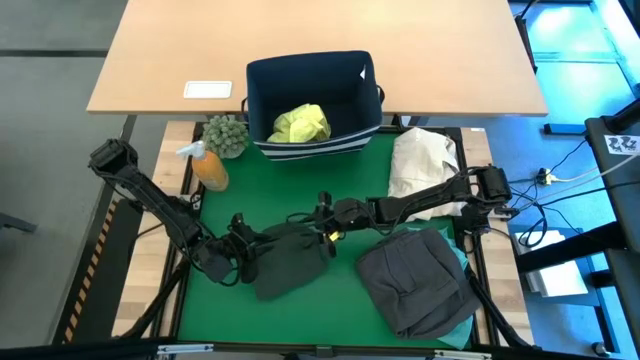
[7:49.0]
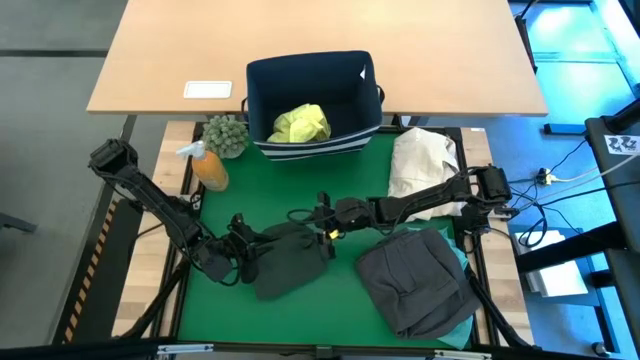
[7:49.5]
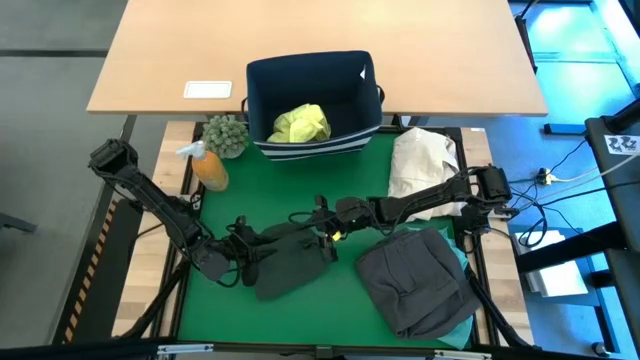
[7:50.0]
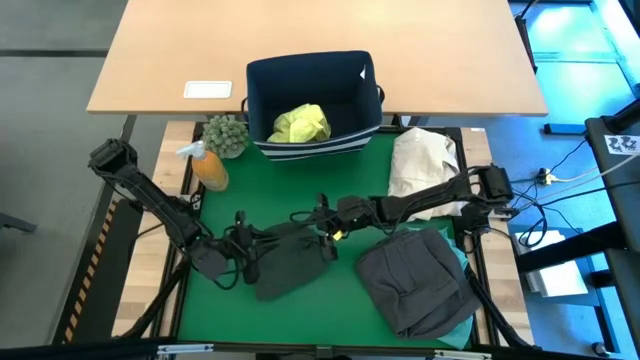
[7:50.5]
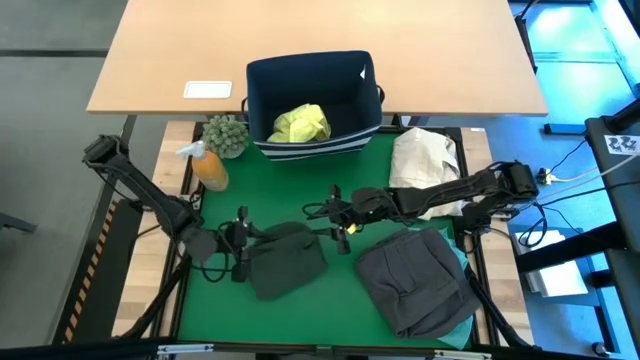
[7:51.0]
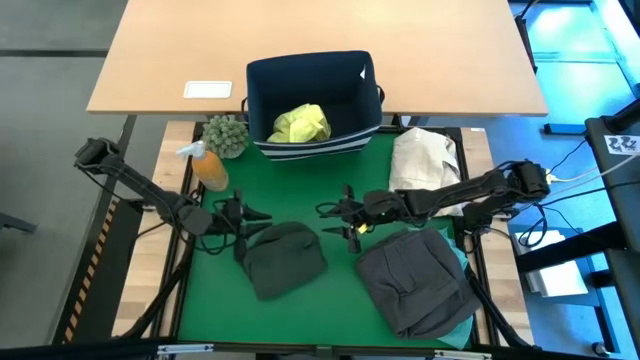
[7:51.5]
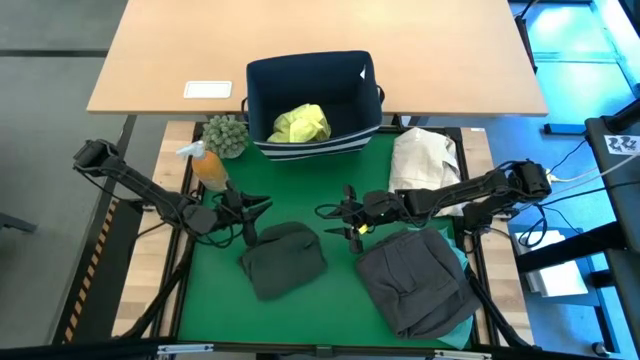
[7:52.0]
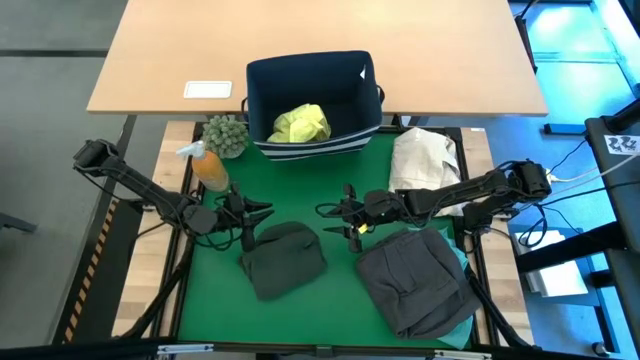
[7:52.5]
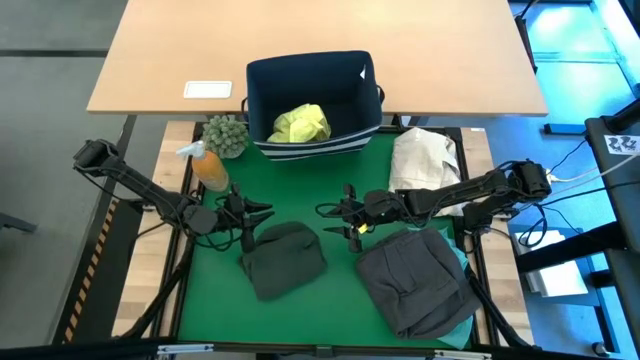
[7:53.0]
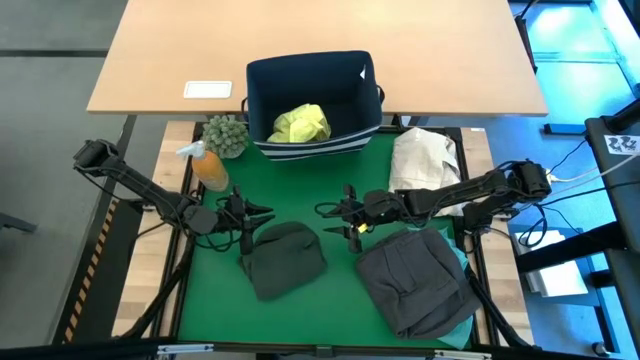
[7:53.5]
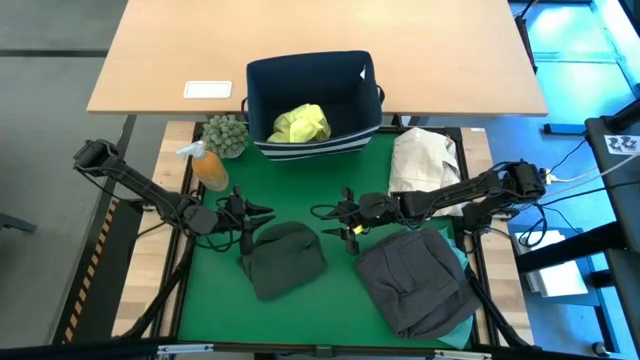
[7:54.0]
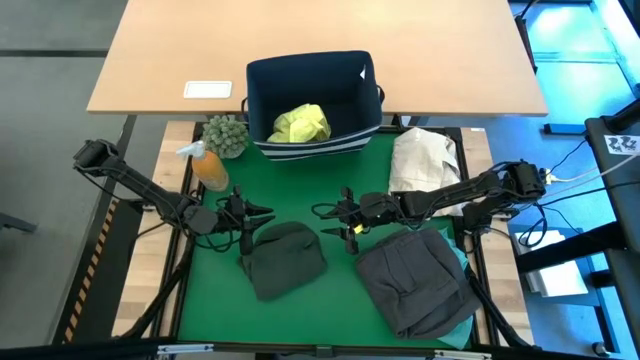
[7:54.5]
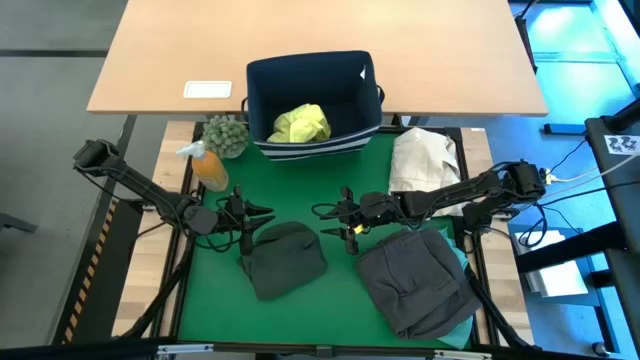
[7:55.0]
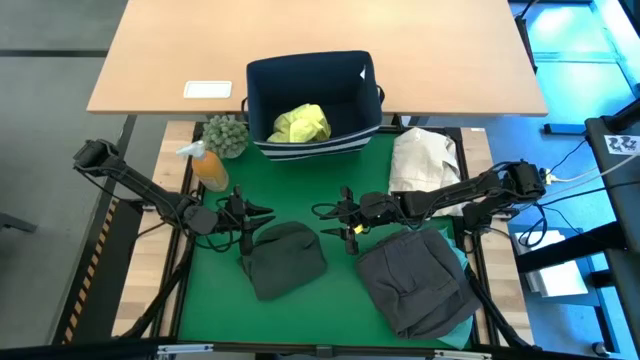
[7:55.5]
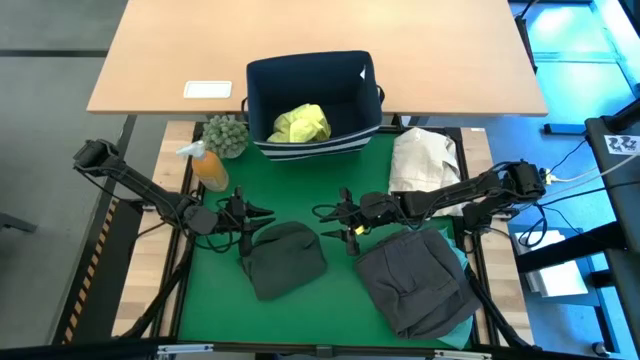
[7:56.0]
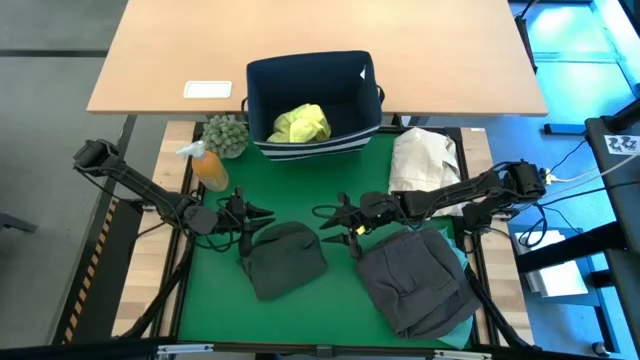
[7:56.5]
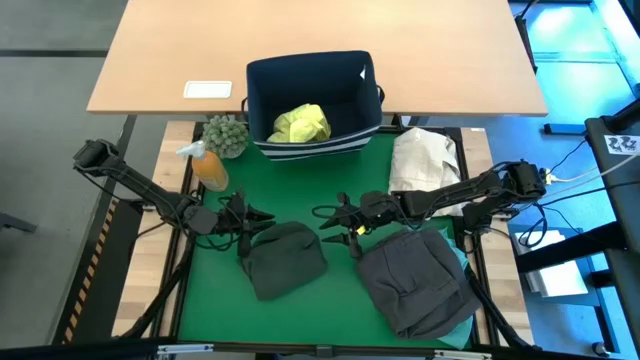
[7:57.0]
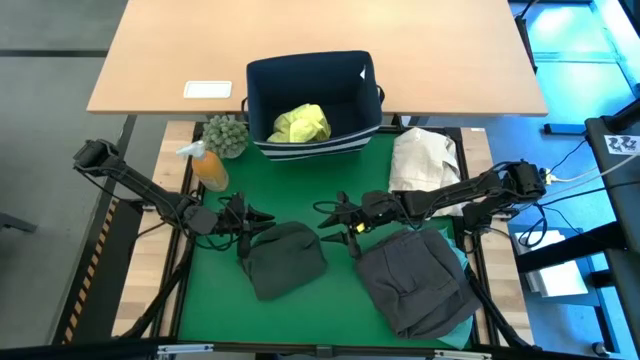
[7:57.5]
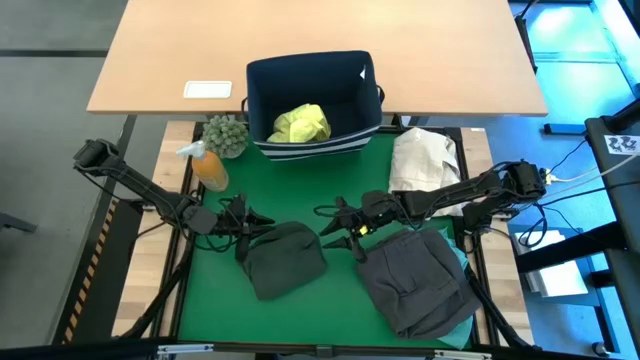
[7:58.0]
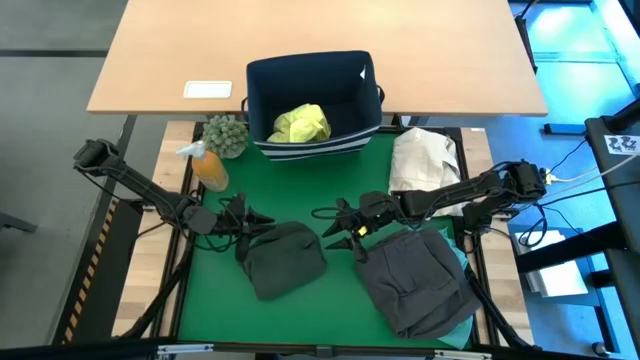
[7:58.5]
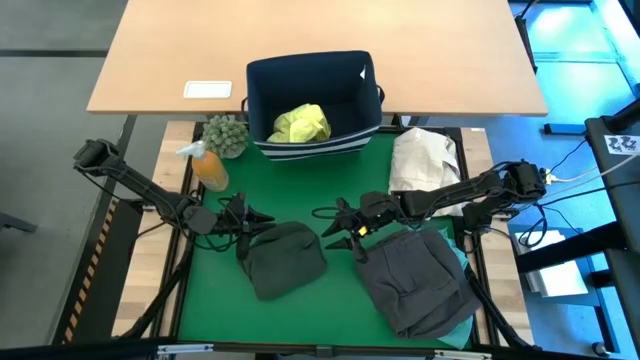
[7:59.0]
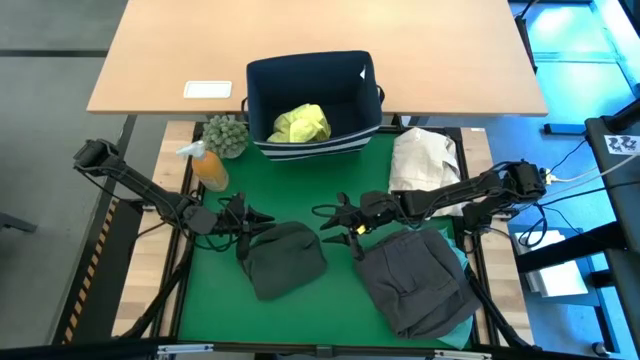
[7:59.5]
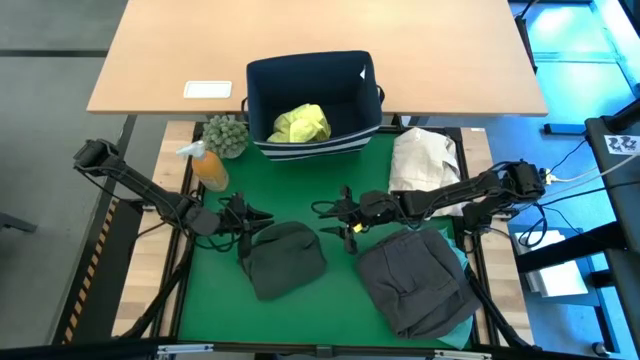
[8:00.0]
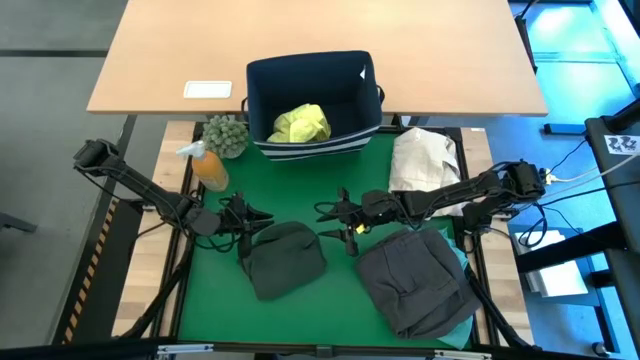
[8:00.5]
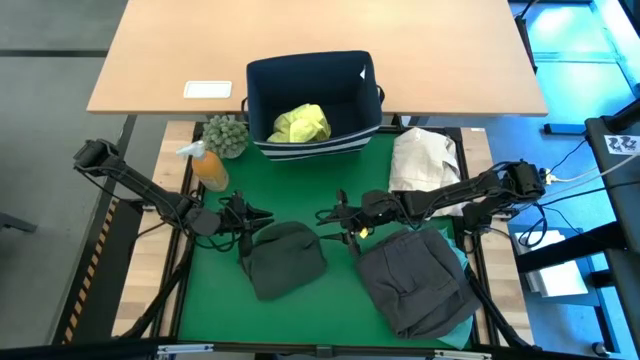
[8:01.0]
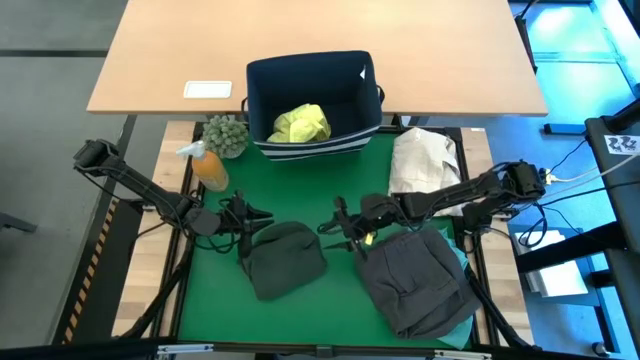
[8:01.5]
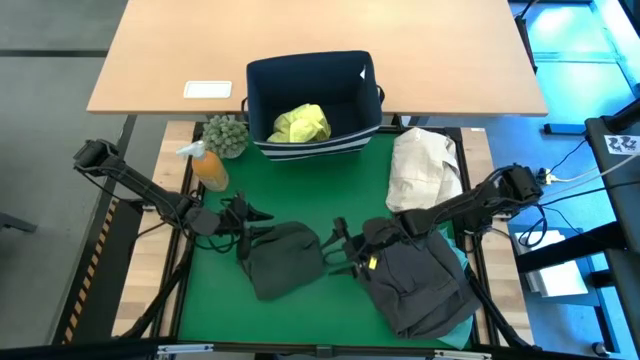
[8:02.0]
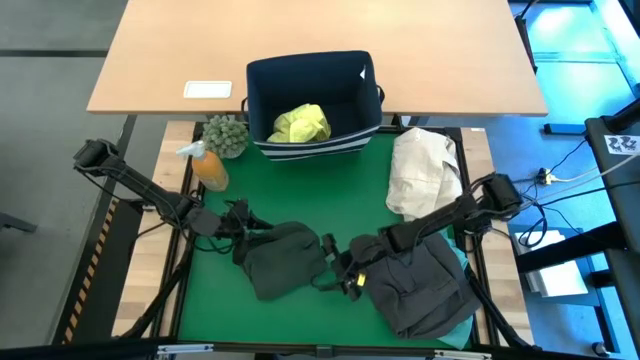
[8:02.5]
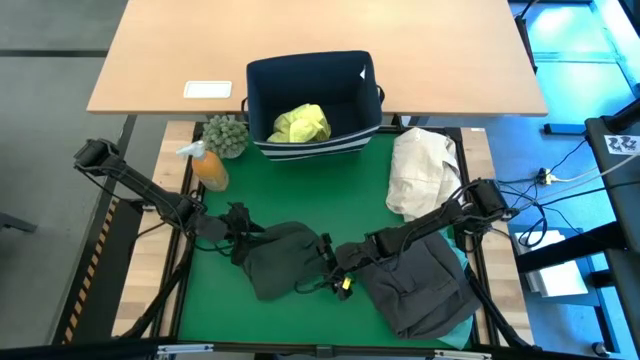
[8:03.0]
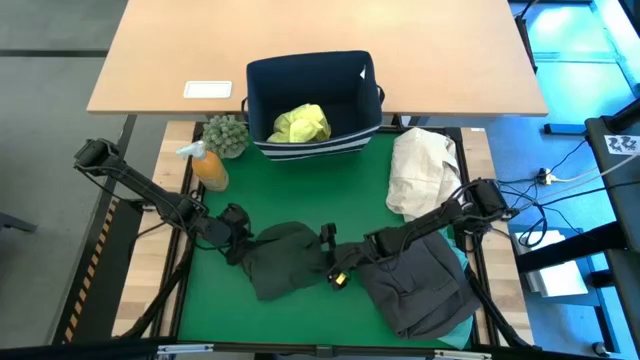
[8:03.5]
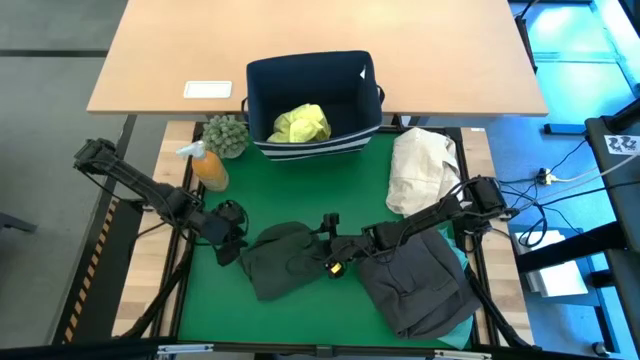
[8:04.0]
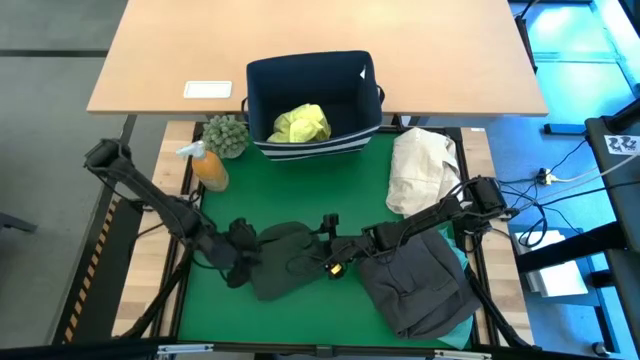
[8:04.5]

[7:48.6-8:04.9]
Task: Fold laundry
Stack the green polo on the black shorts
